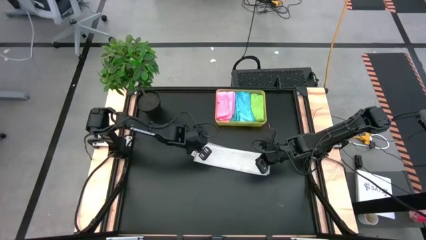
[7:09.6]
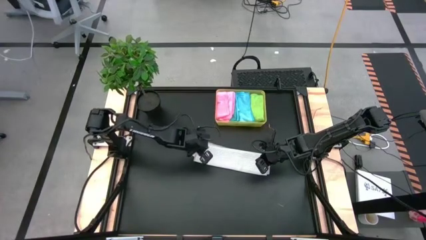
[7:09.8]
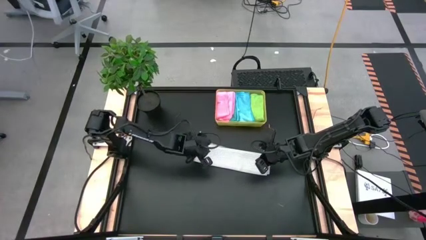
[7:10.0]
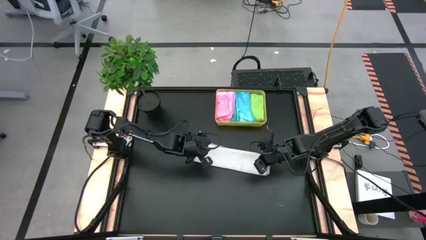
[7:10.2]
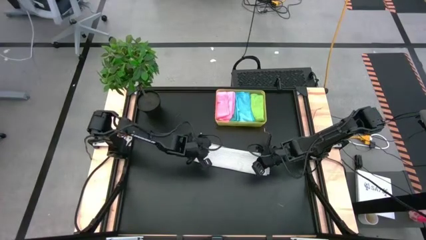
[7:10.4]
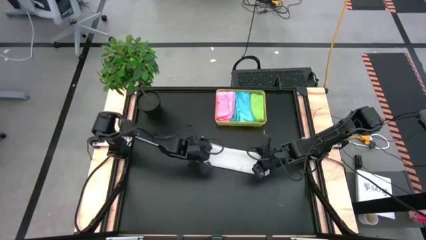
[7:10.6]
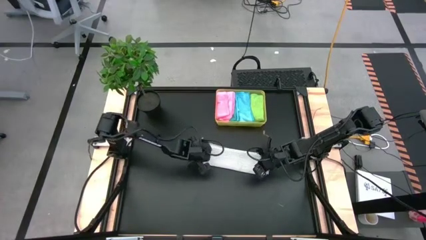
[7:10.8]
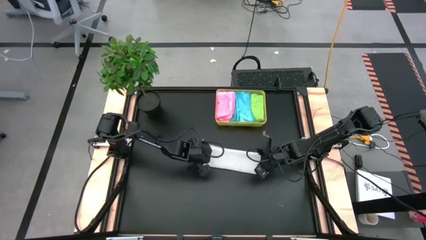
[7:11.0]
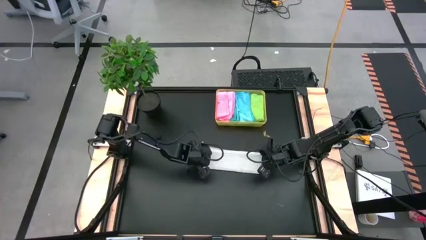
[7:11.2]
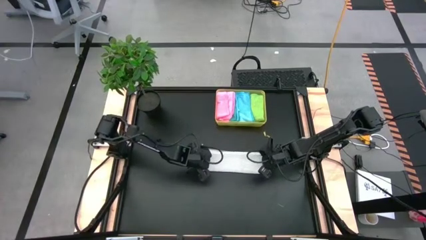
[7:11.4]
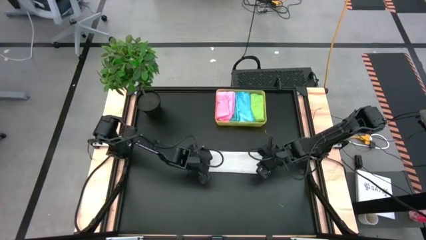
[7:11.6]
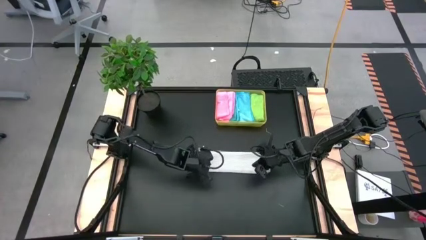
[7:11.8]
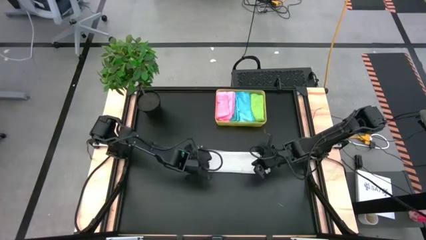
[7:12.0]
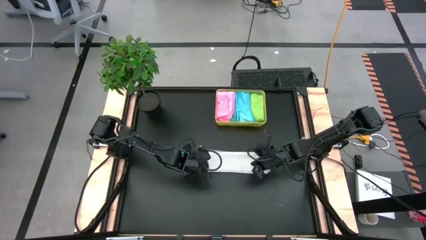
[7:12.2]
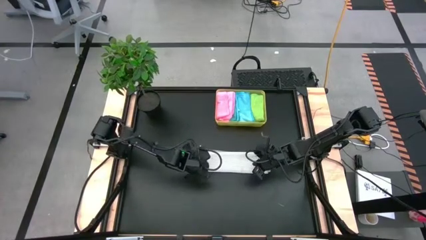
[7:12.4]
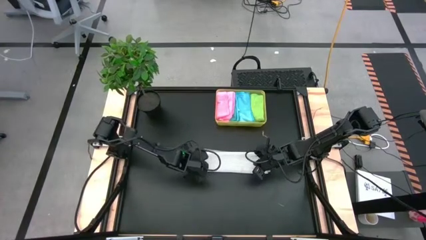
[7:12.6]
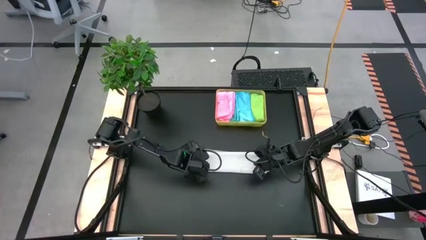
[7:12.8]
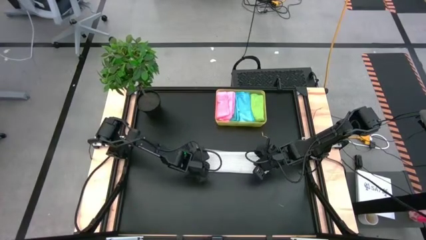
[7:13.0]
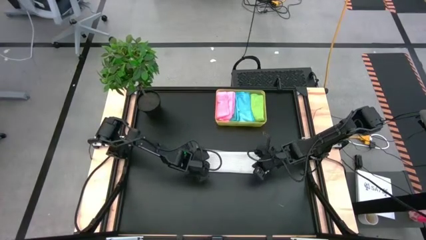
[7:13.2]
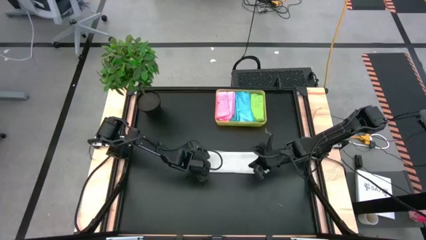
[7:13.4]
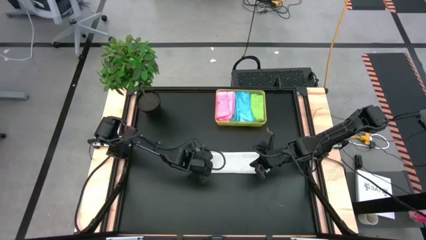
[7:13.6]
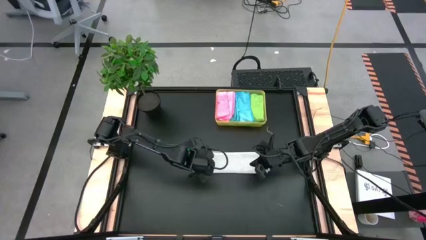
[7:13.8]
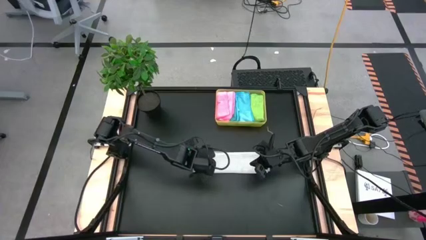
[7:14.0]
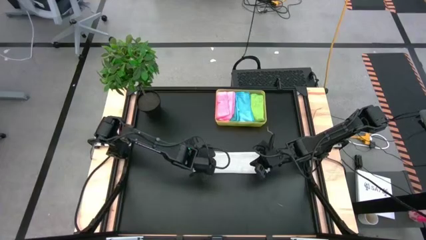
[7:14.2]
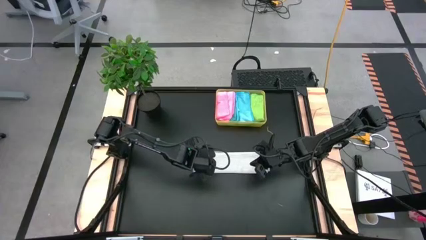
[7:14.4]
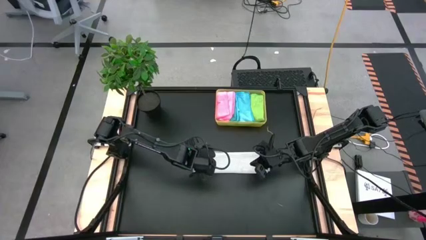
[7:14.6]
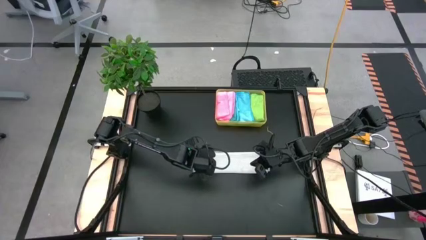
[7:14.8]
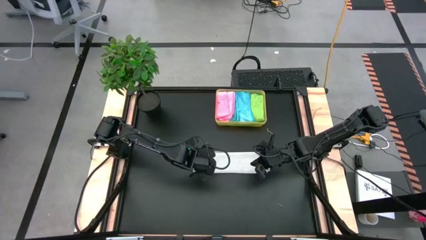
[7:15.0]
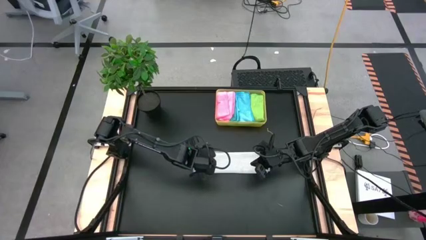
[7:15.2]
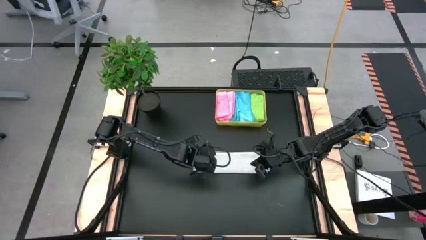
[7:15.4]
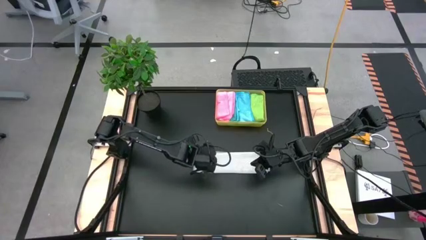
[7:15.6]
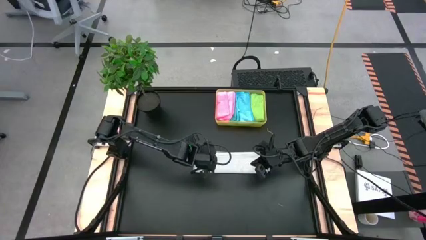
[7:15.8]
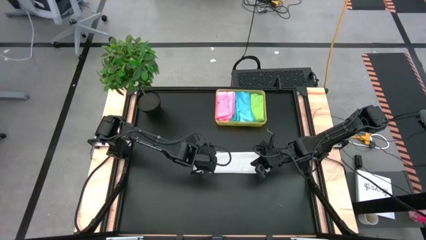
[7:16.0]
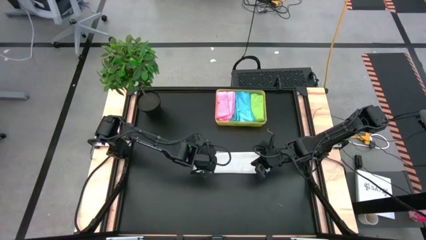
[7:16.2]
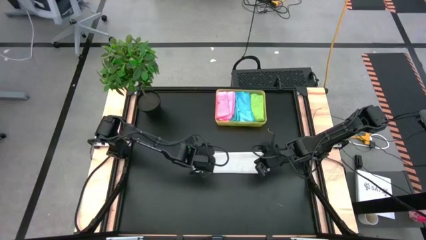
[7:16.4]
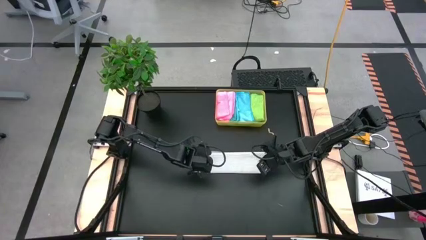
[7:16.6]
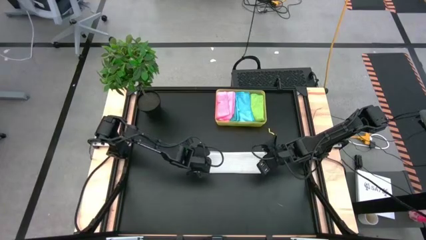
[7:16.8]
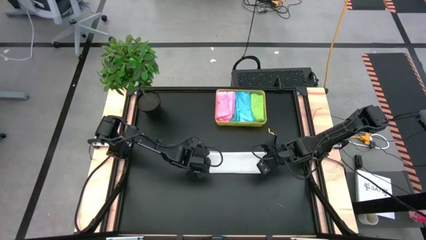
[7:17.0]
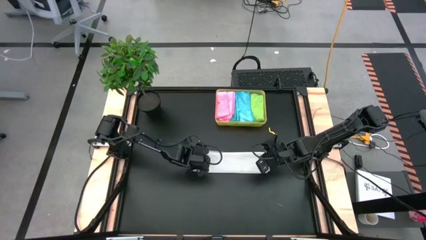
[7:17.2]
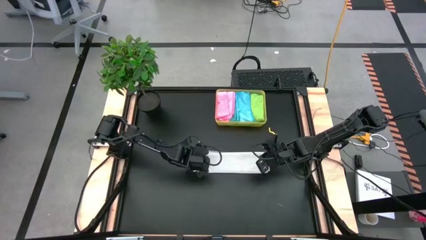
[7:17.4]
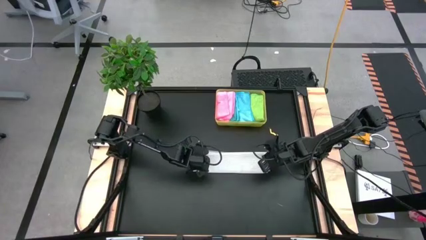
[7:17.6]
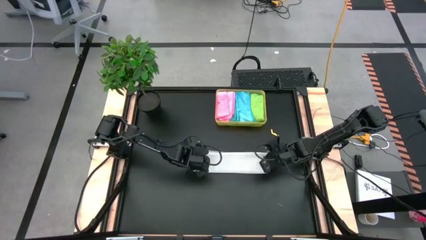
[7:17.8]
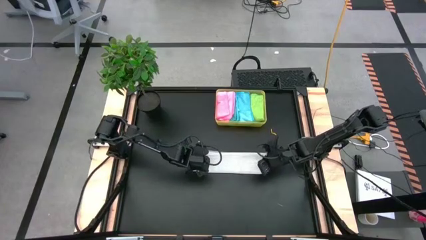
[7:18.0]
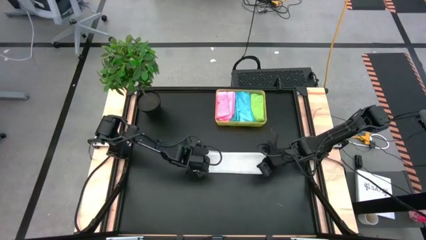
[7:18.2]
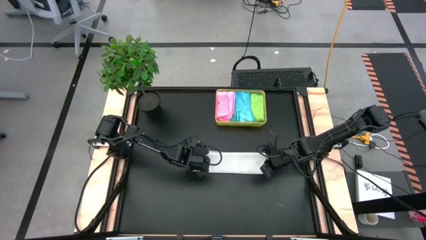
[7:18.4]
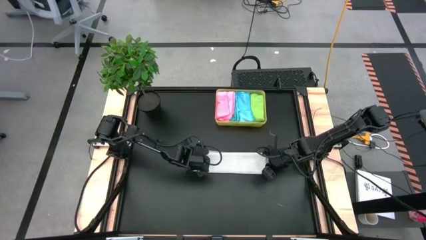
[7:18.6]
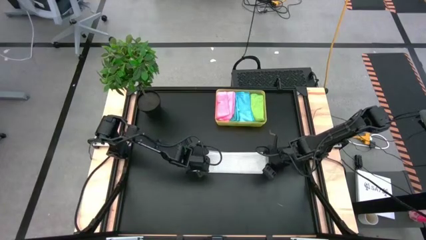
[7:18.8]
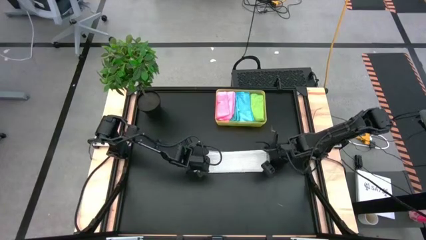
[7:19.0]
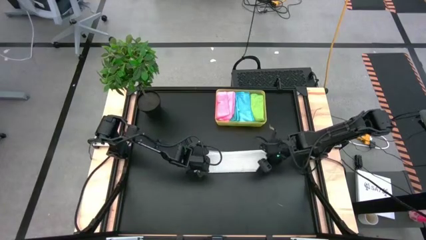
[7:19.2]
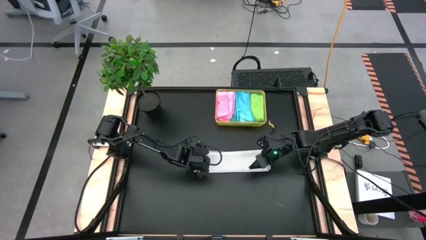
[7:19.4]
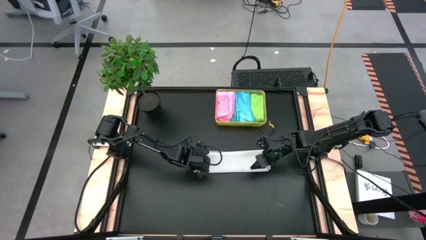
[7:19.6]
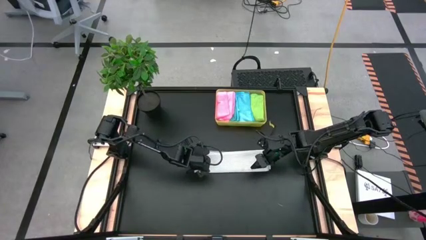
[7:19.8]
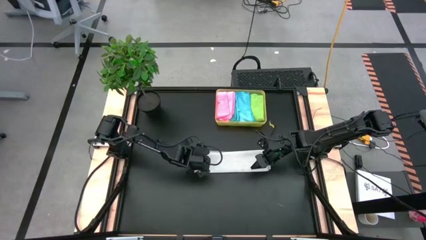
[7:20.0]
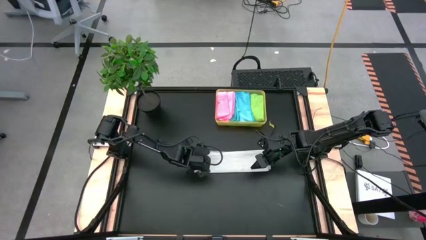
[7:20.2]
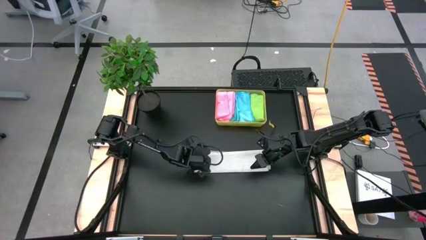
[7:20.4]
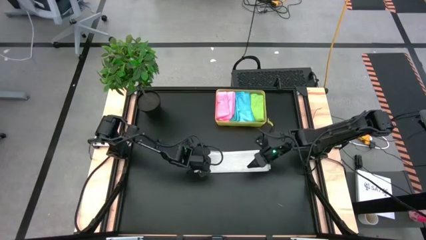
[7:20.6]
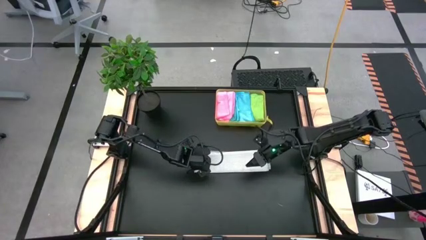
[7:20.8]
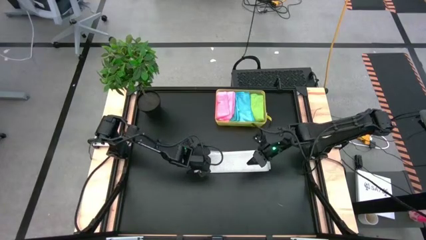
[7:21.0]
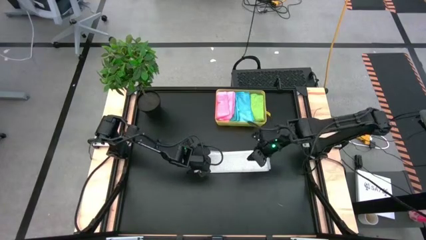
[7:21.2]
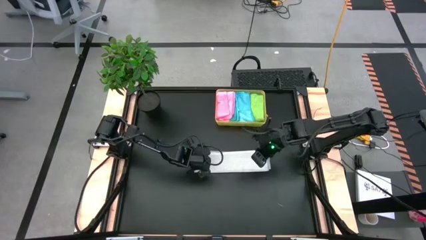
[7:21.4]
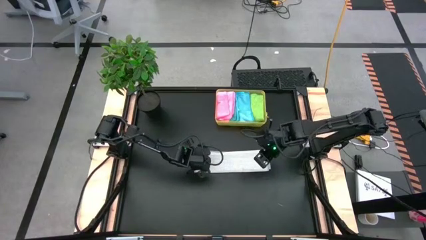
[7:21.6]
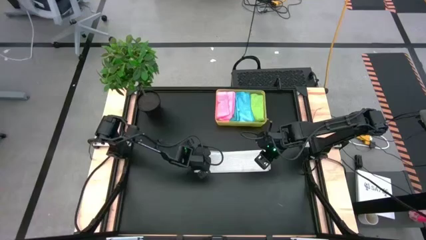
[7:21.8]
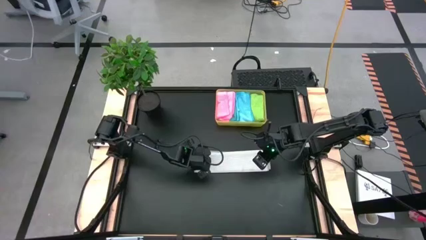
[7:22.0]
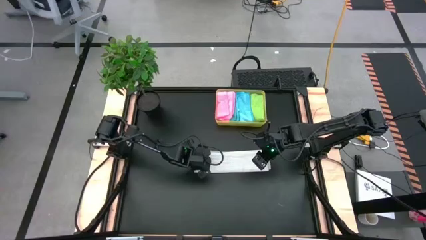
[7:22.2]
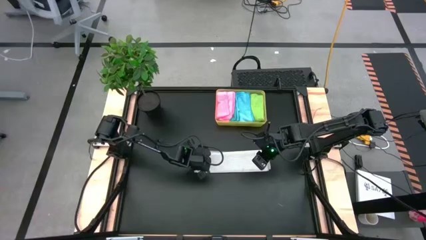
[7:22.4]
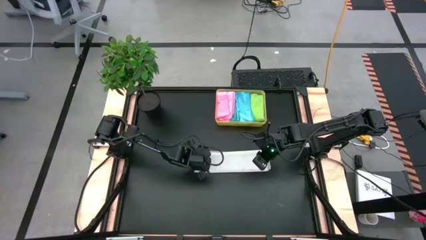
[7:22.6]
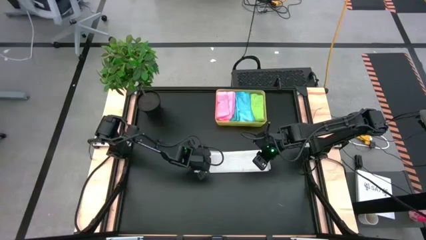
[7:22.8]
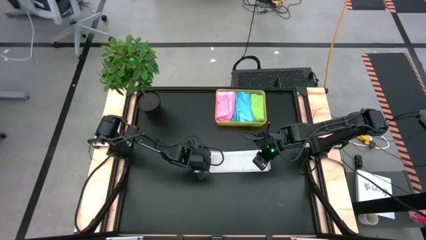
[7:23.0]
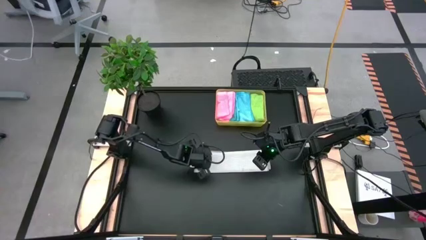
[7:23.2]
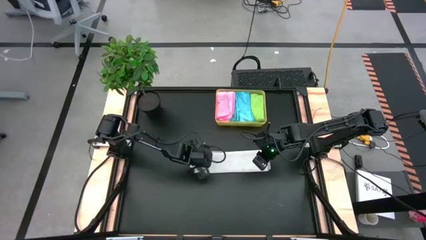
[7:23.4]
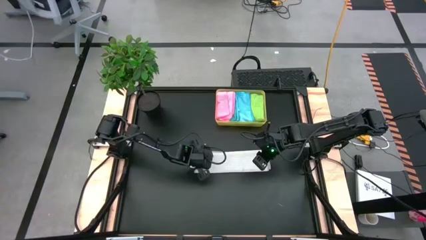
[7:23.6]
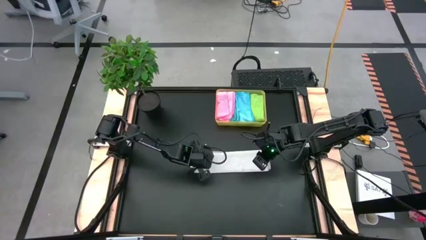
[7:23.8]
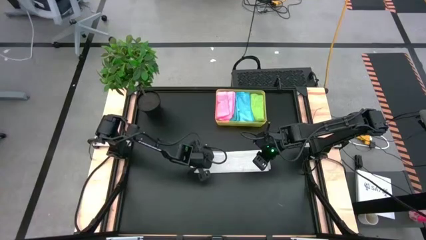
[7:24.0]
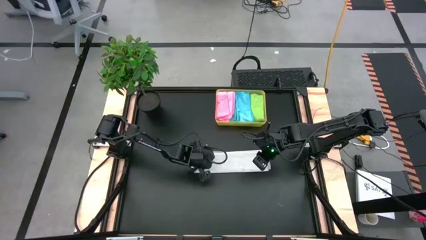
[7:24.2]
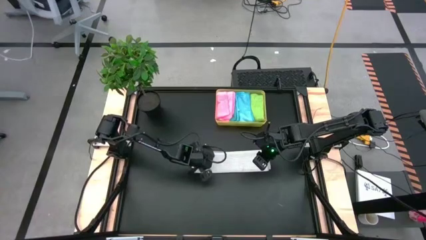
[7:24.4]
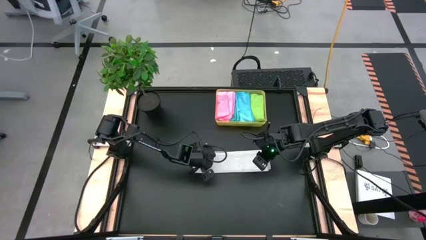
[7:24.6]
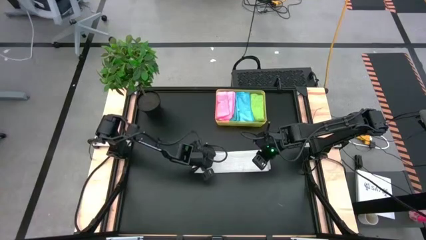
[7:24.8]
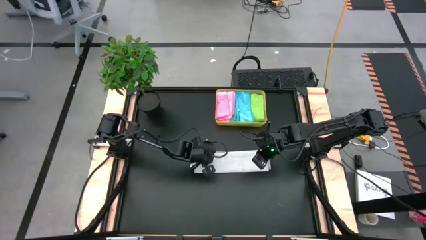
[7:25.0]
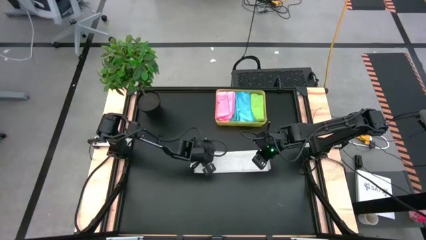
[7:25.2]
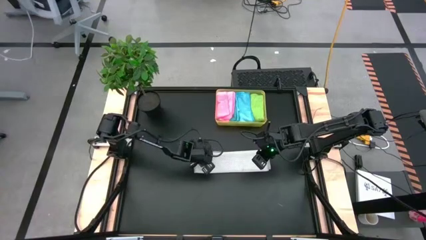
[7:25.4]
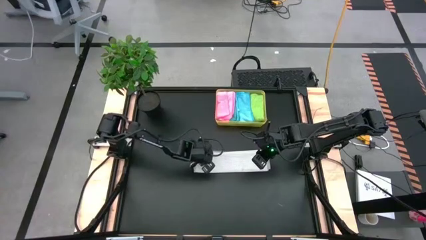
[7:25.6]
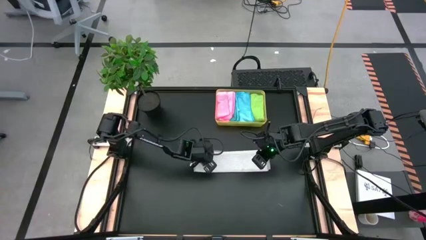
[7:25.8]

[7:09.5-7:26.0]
Task: Fold microfiber towels
Fold the white microfiber cloth
